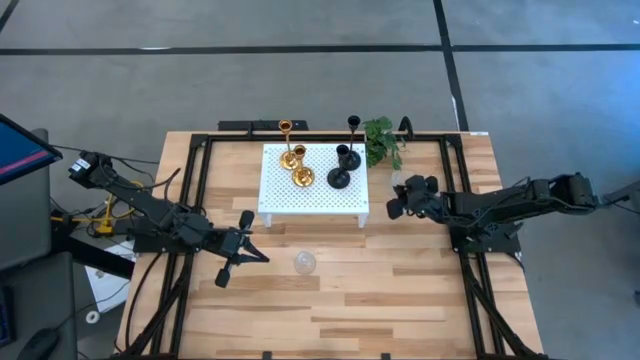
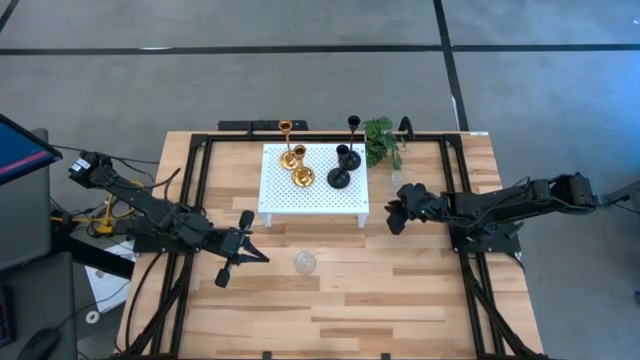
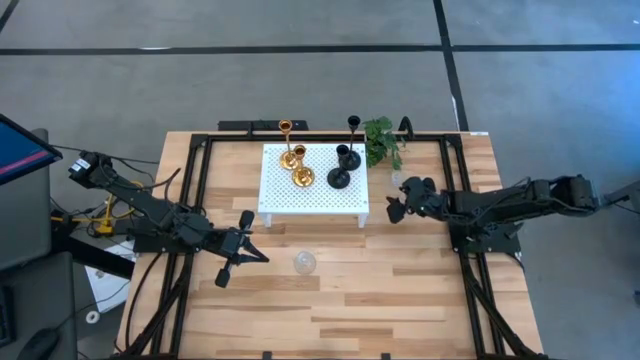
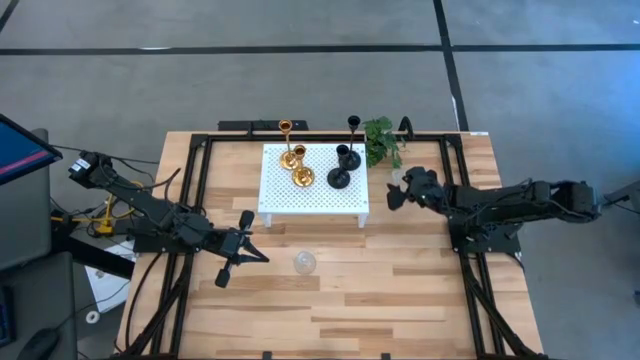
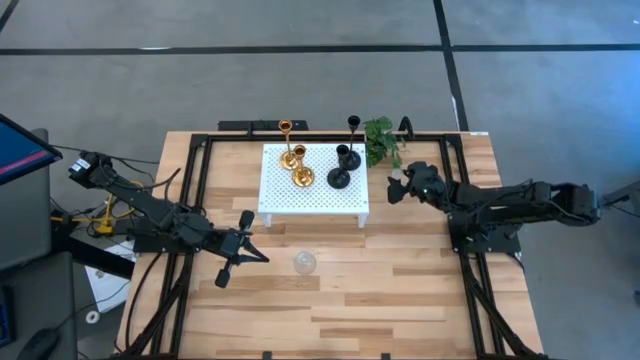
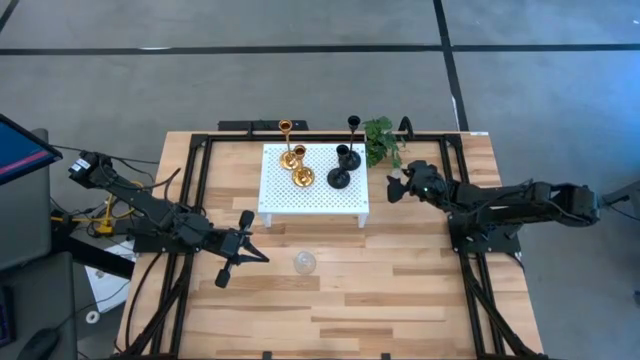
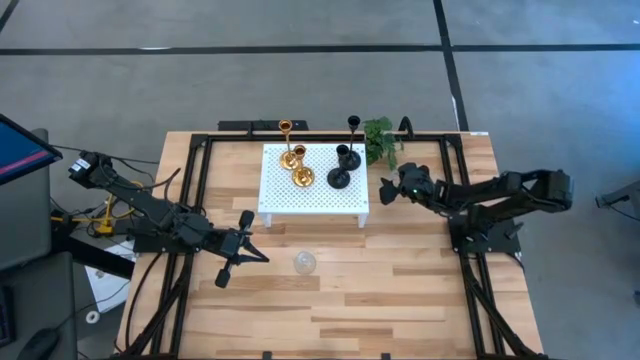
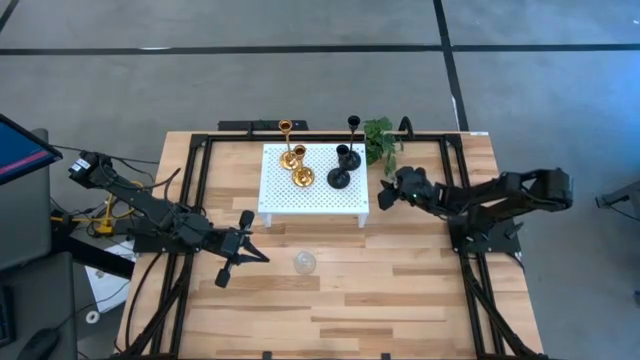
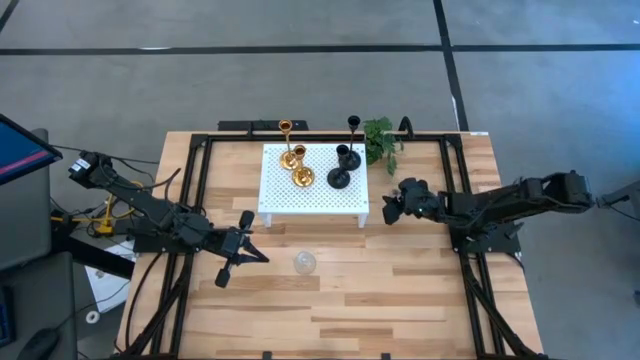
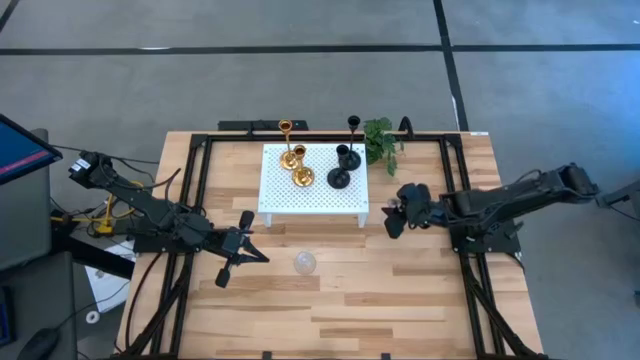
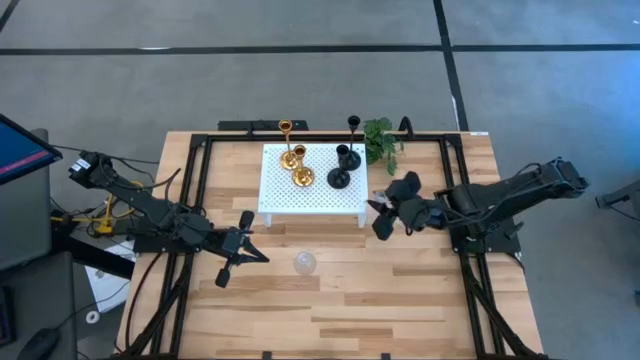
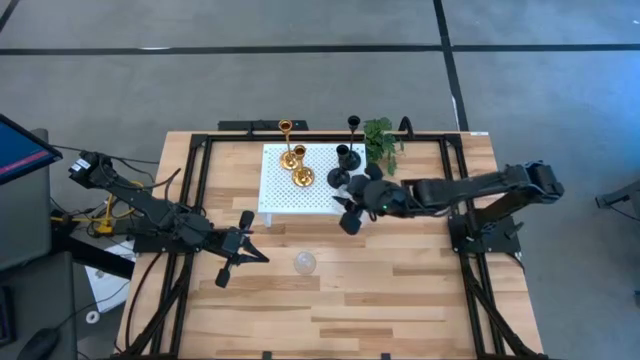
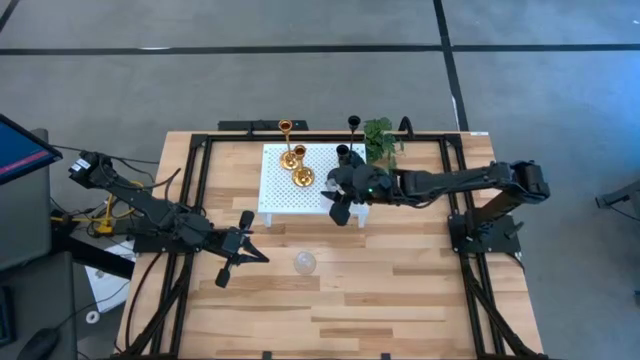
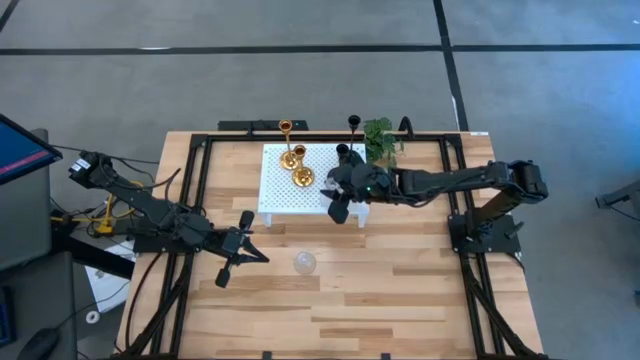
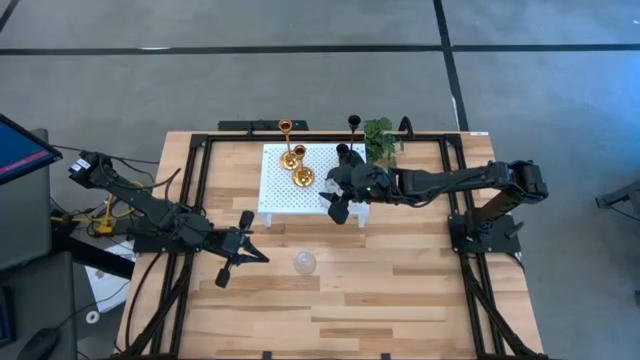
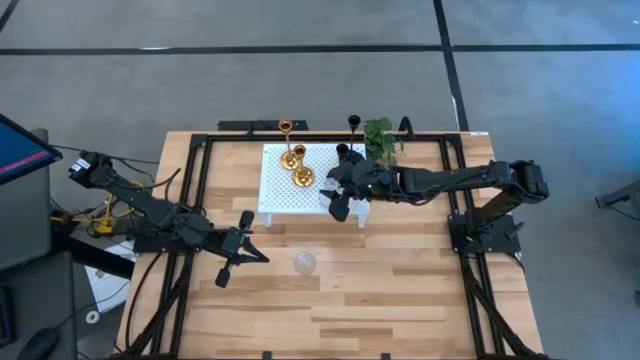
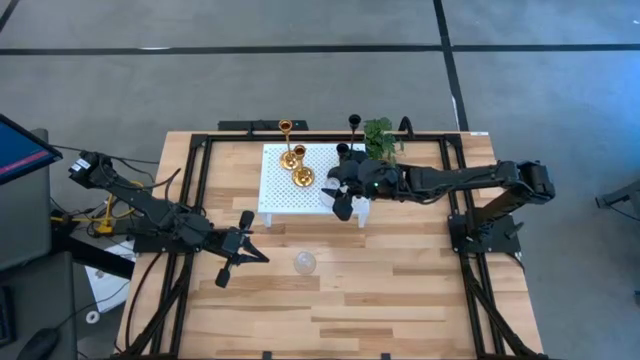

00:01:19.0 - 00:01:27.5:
Task: Pick & Place candle stick holders
Put the top transparent glass candle holder on the shelf

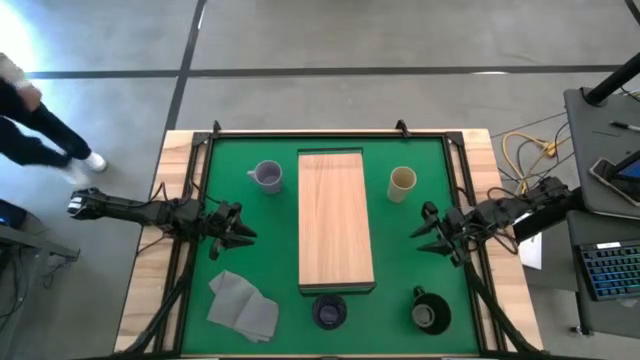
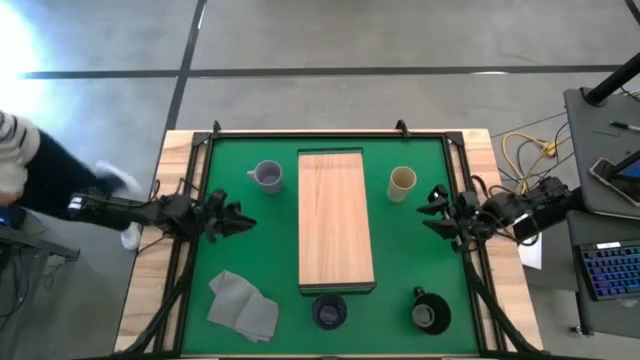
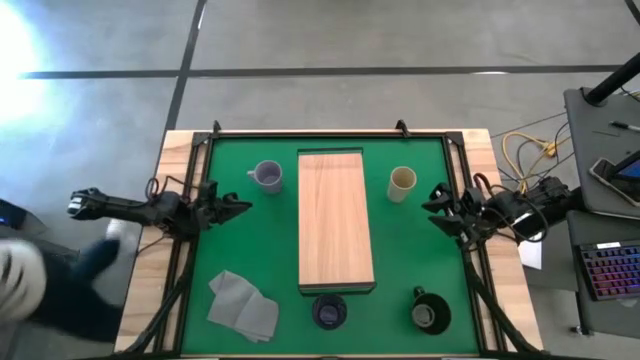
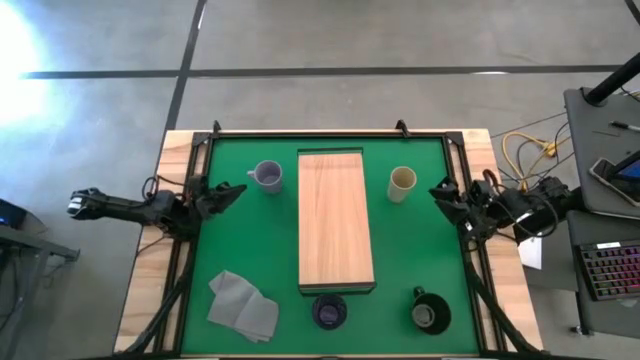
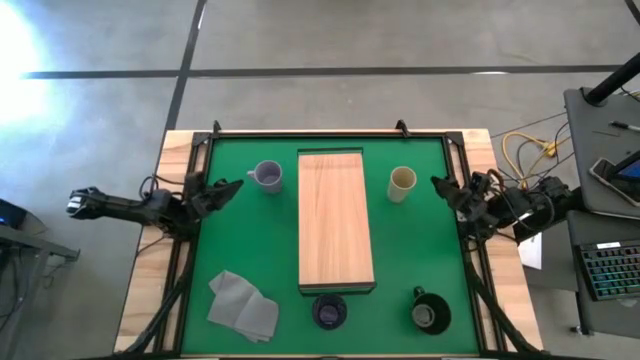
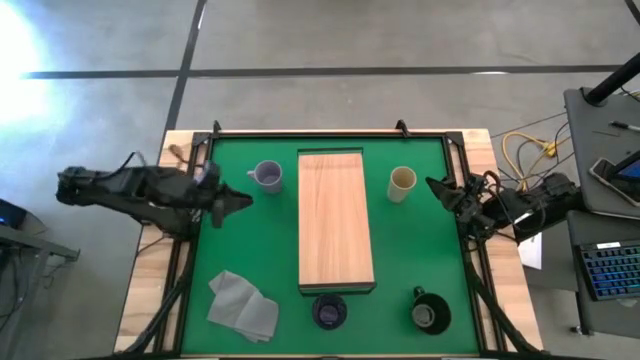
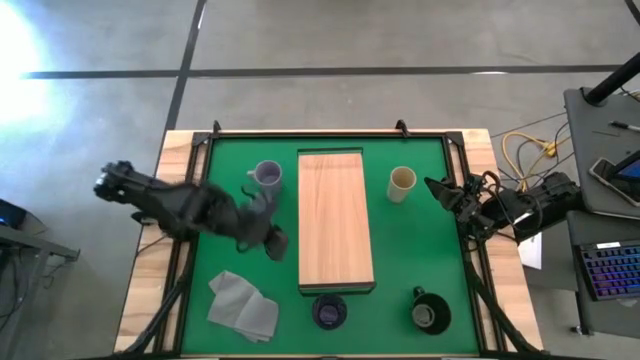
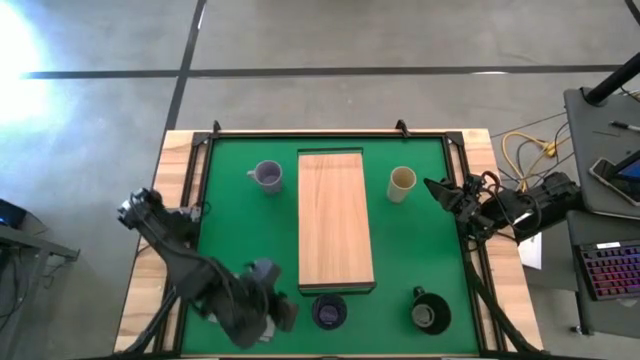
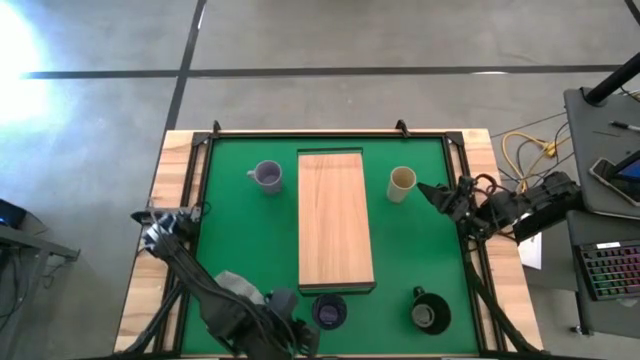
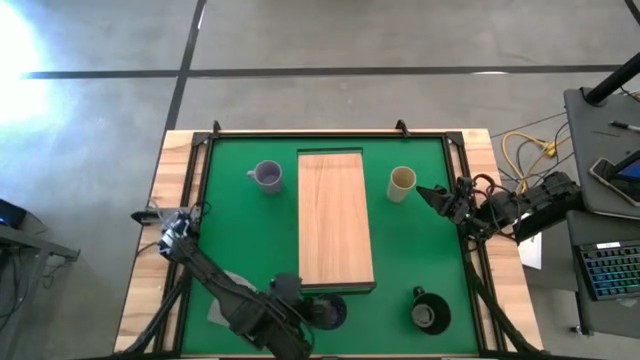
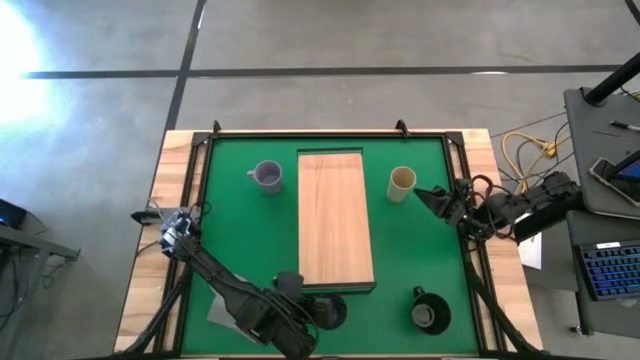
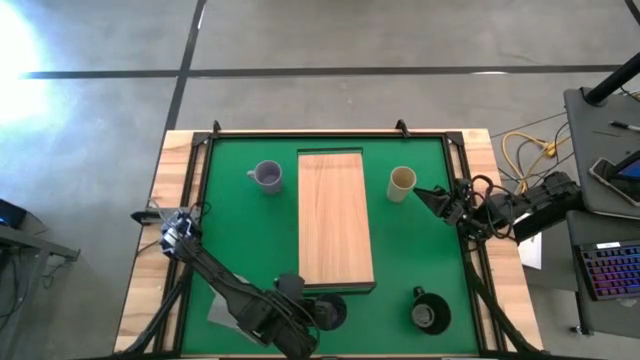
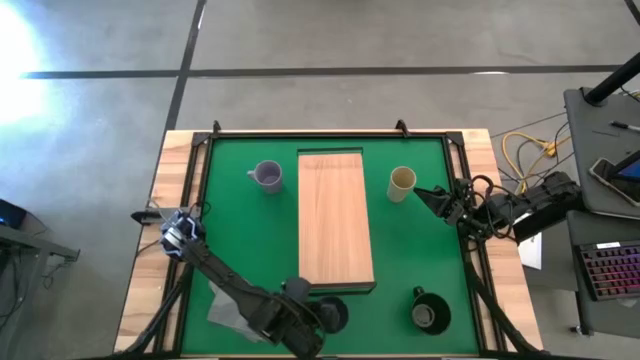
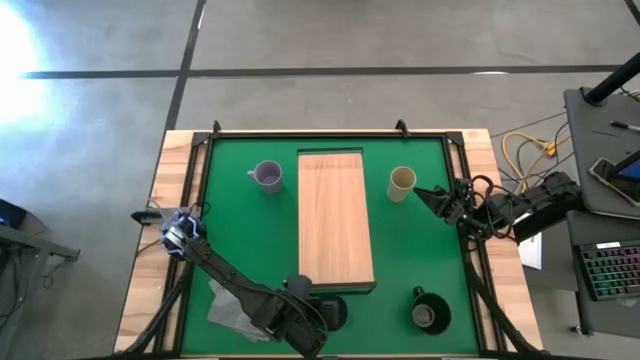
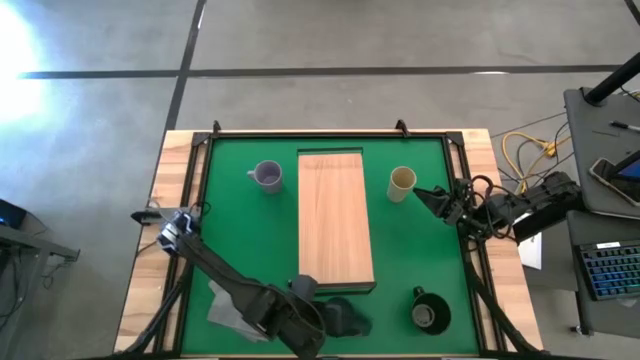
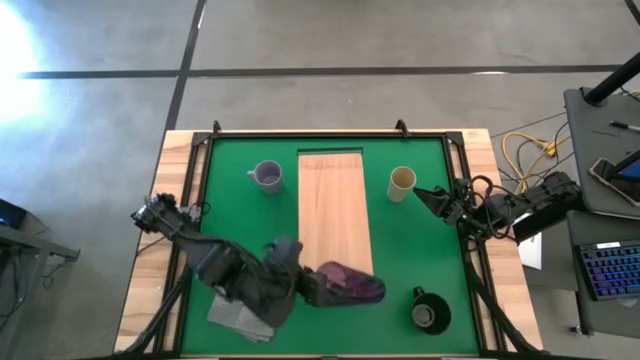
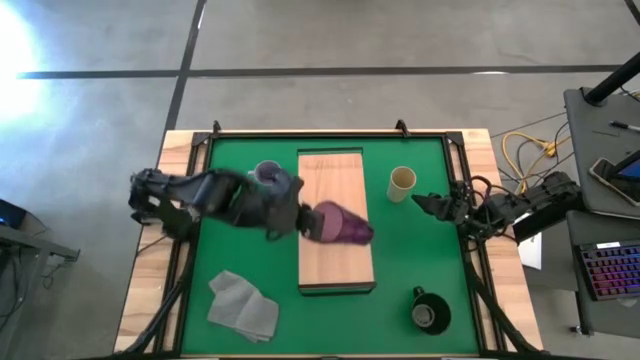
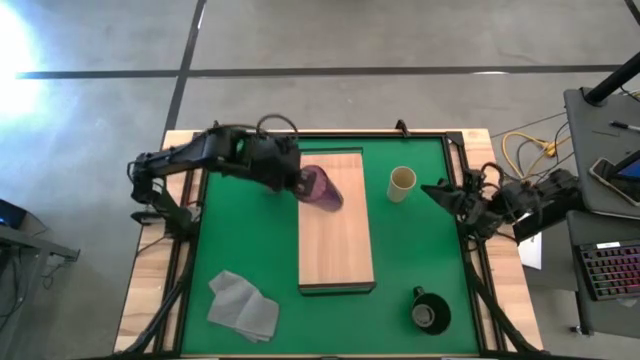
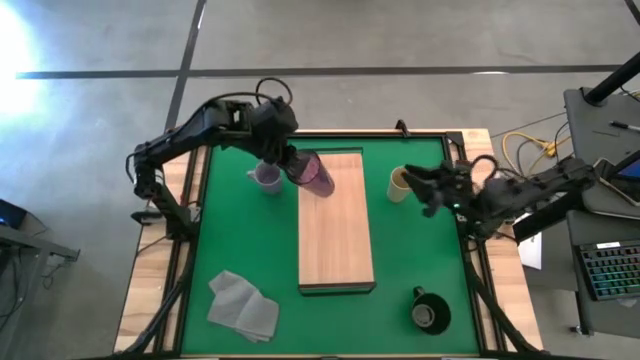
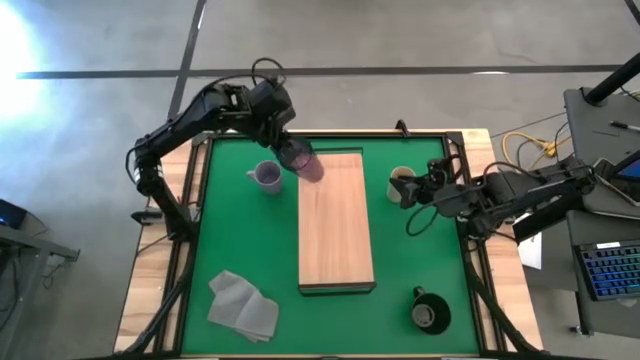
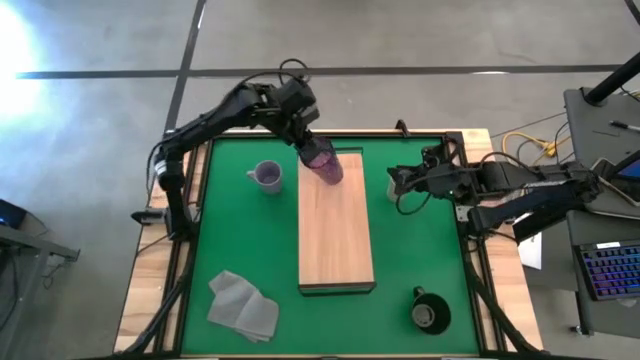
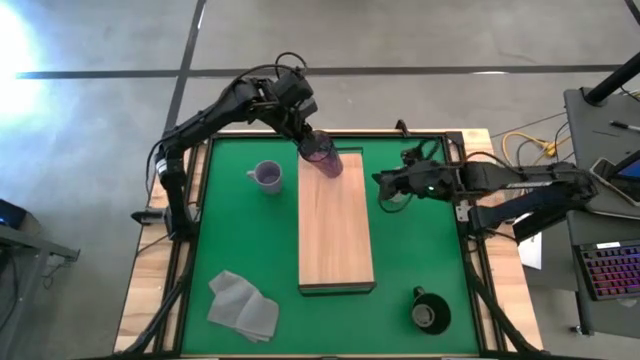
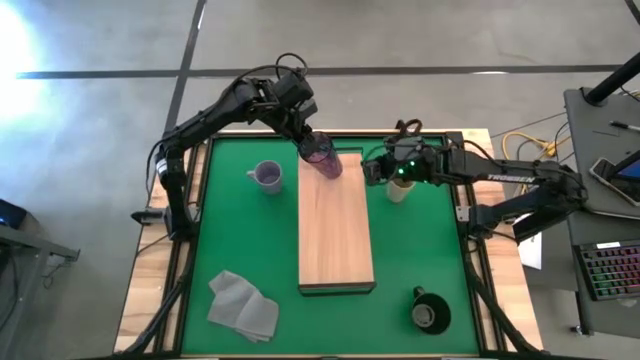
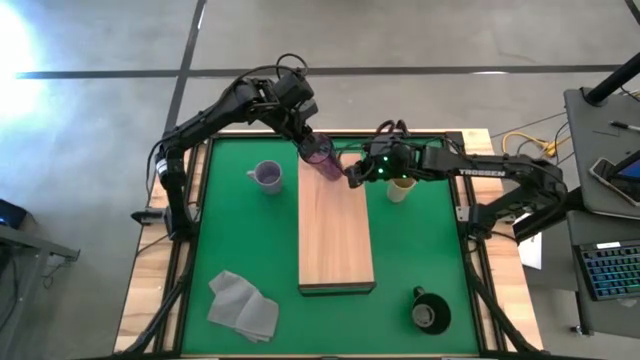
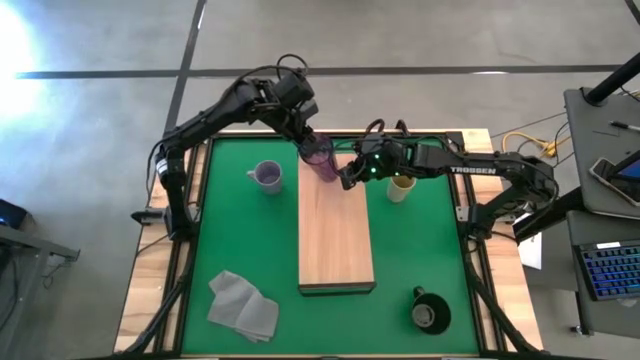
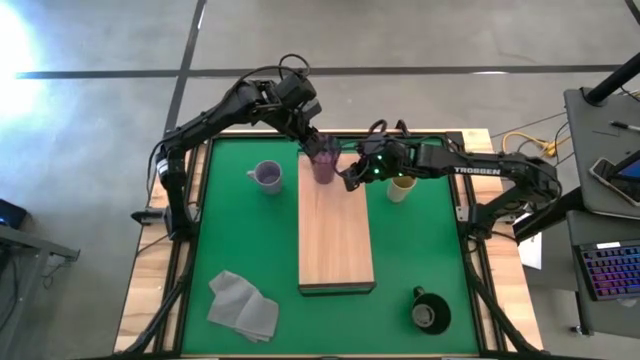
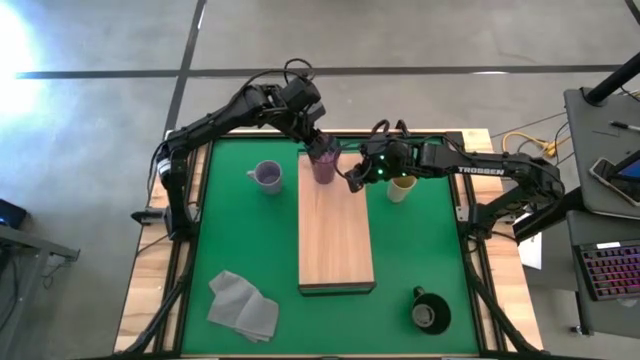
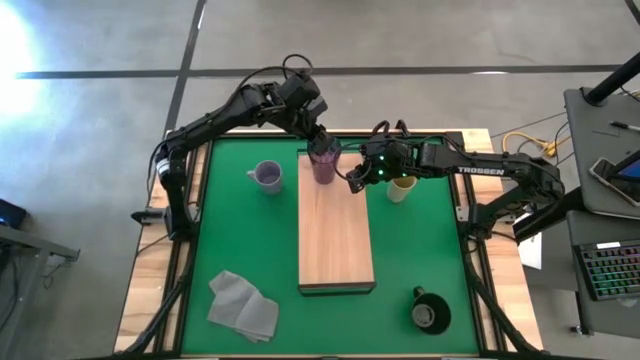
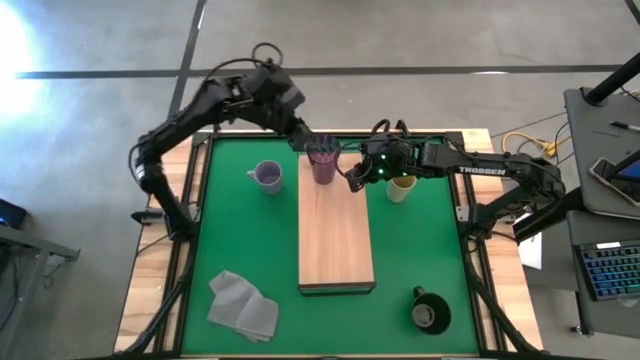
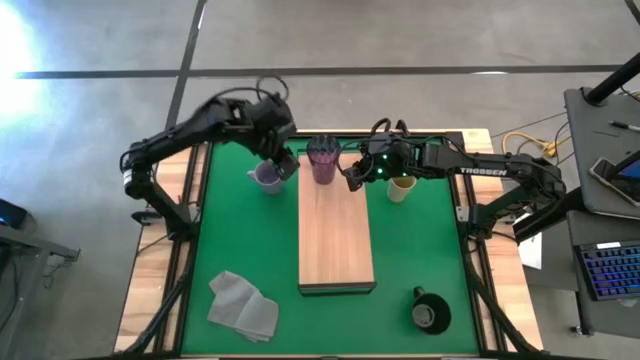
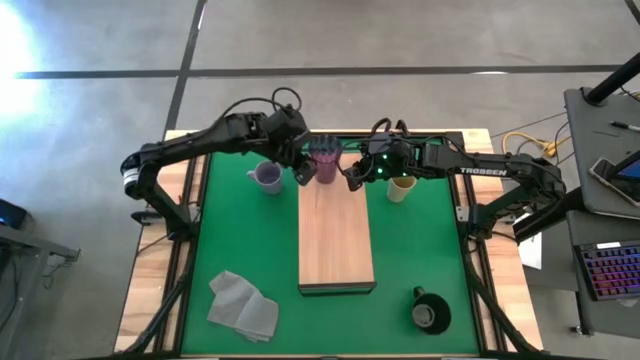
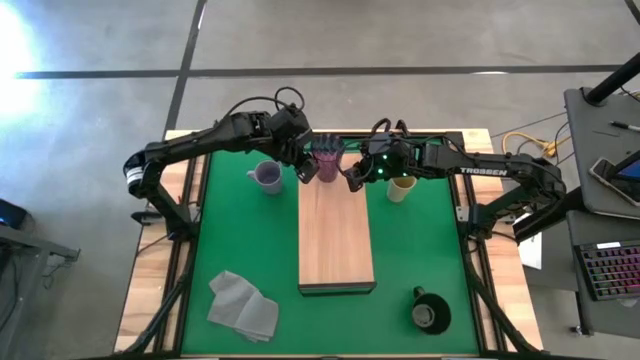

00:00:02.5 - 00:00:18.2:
Task: Stack small to large cups/mugs on shelf
Put the violet cup on the shelf
